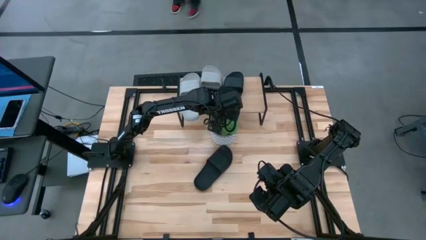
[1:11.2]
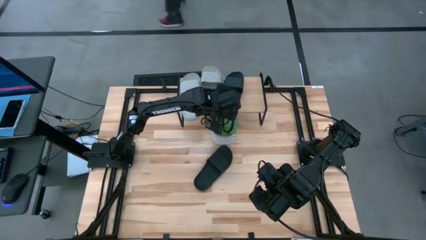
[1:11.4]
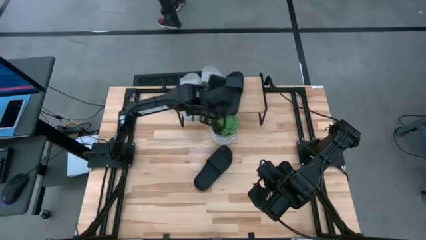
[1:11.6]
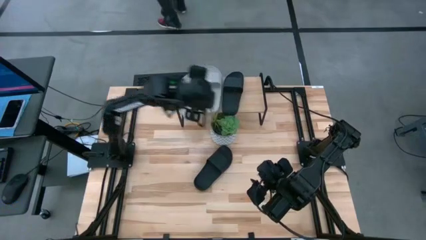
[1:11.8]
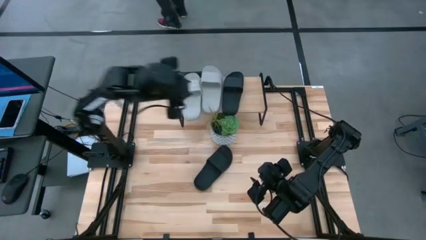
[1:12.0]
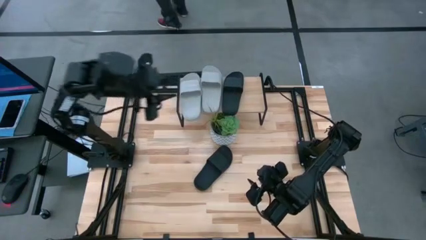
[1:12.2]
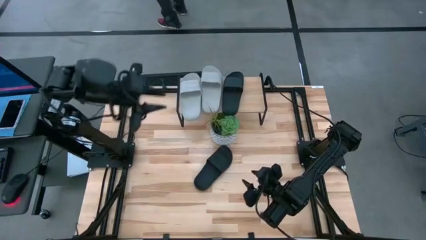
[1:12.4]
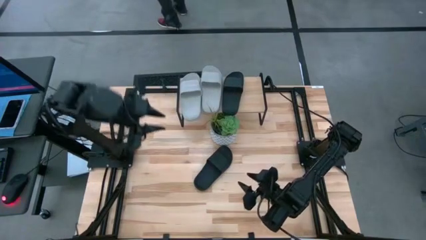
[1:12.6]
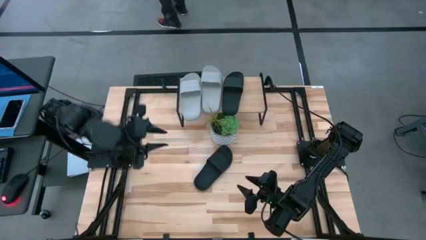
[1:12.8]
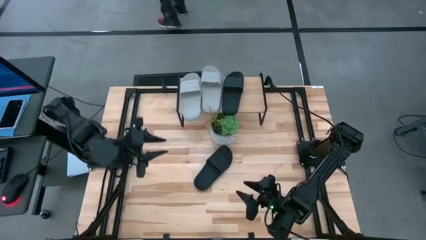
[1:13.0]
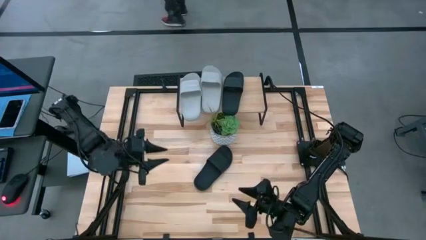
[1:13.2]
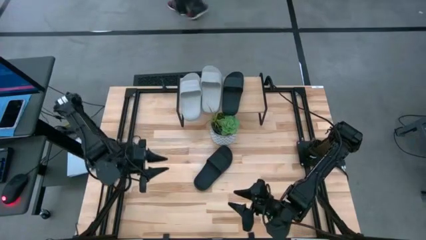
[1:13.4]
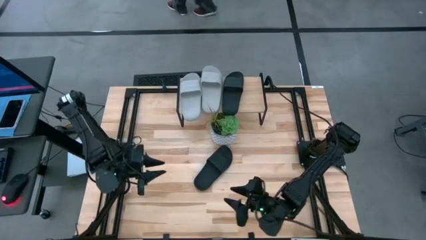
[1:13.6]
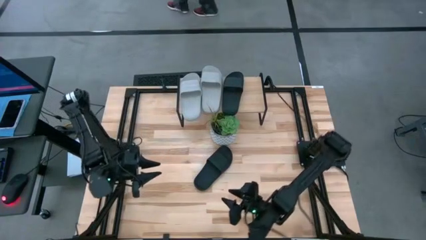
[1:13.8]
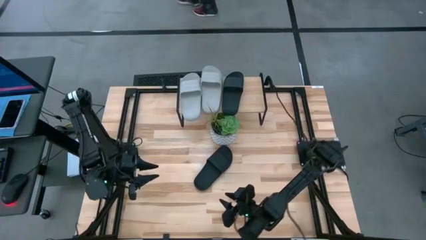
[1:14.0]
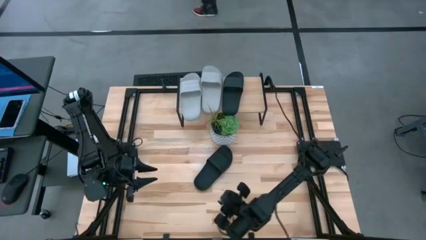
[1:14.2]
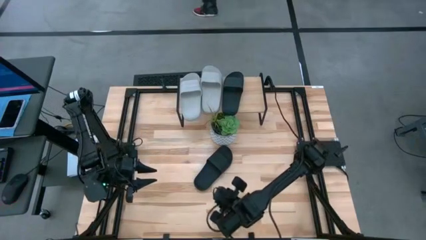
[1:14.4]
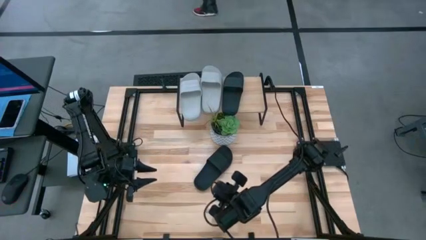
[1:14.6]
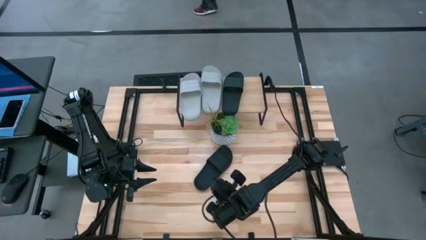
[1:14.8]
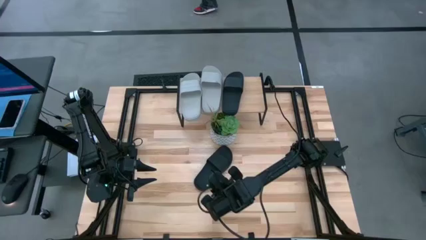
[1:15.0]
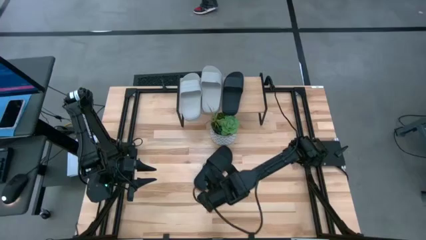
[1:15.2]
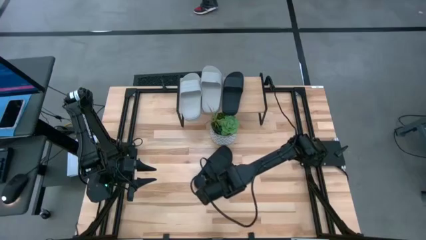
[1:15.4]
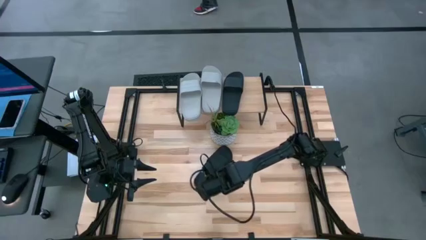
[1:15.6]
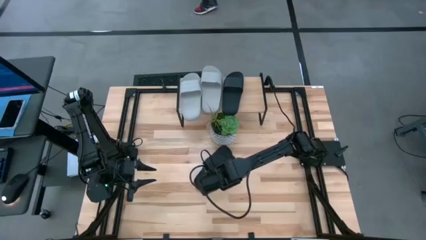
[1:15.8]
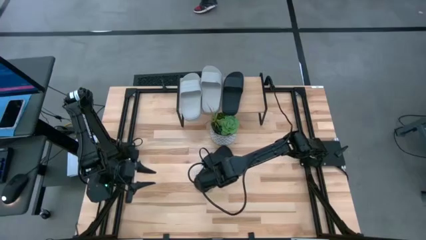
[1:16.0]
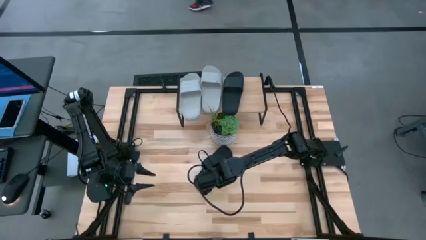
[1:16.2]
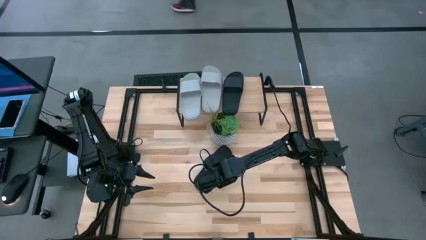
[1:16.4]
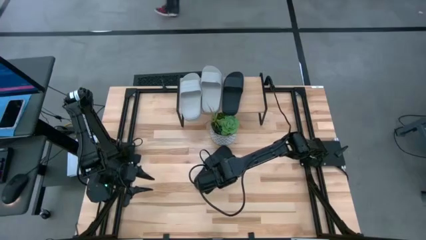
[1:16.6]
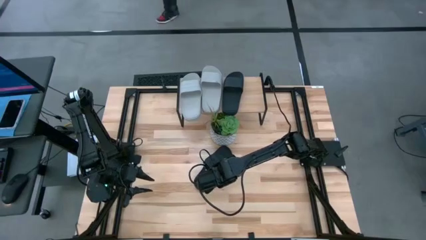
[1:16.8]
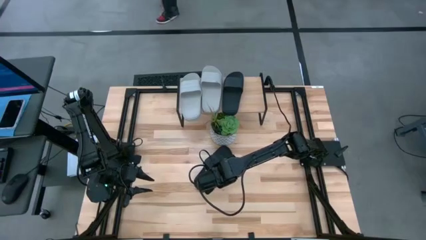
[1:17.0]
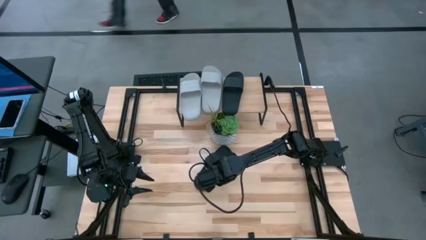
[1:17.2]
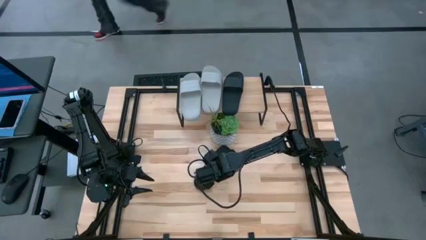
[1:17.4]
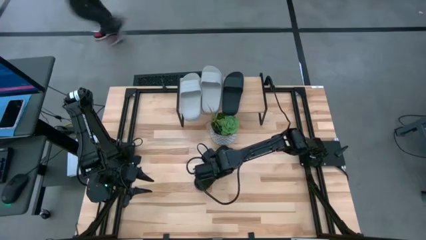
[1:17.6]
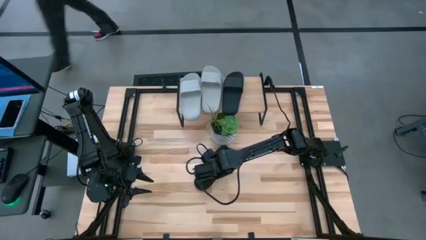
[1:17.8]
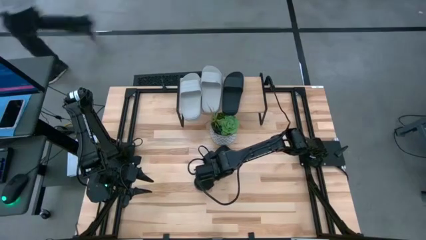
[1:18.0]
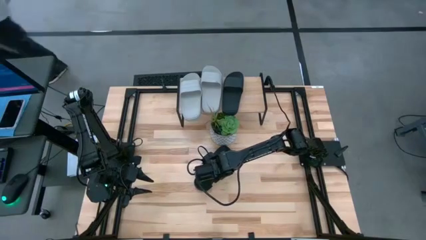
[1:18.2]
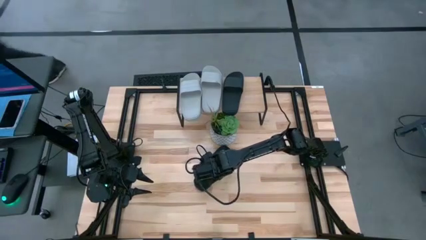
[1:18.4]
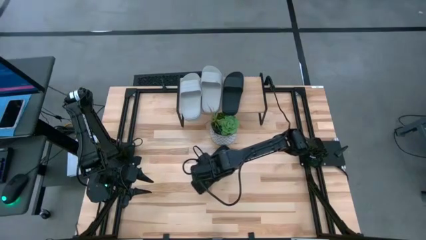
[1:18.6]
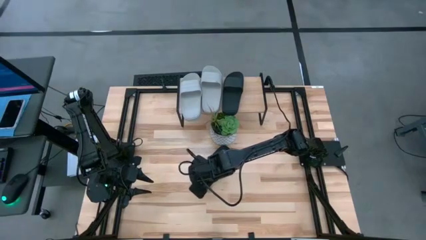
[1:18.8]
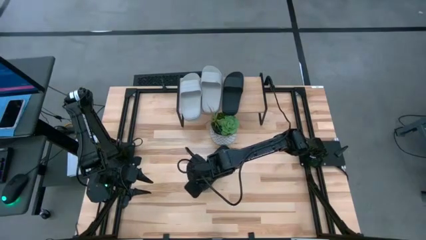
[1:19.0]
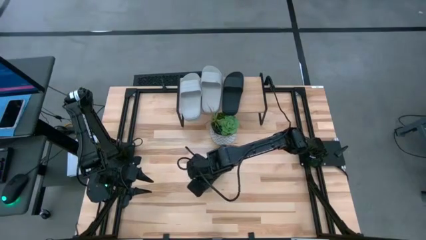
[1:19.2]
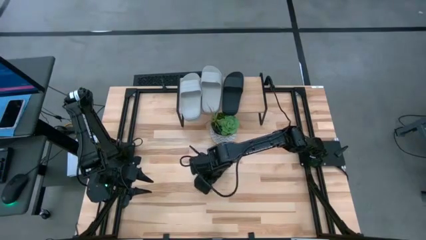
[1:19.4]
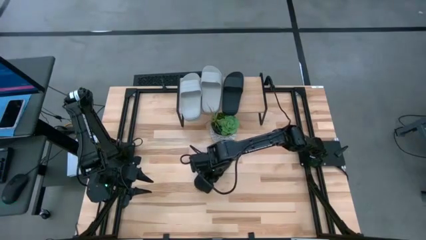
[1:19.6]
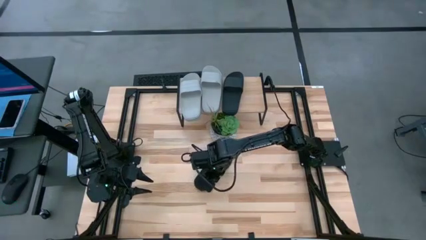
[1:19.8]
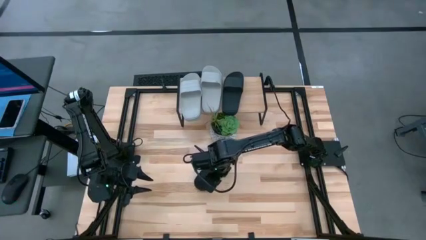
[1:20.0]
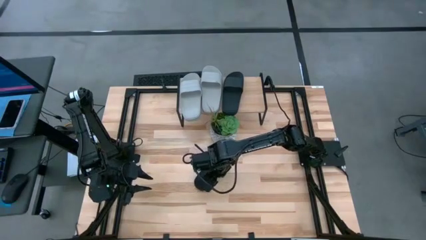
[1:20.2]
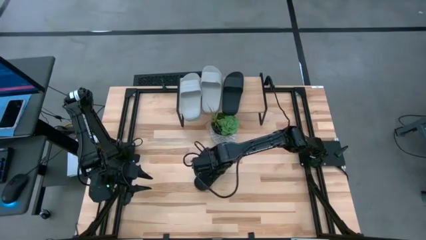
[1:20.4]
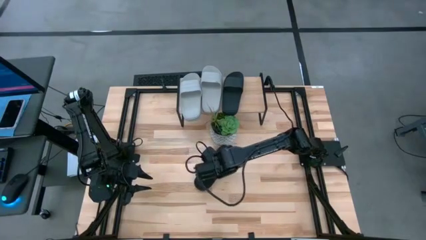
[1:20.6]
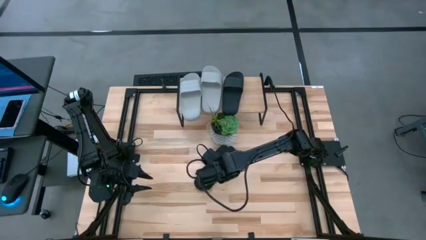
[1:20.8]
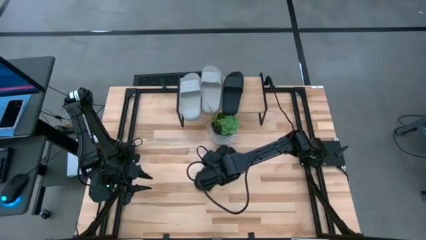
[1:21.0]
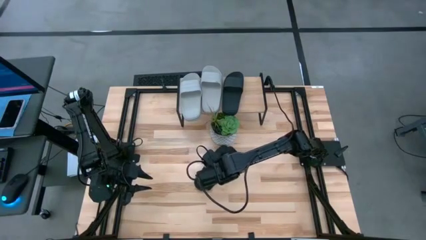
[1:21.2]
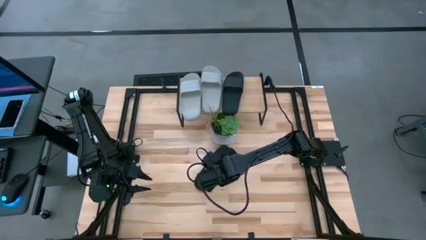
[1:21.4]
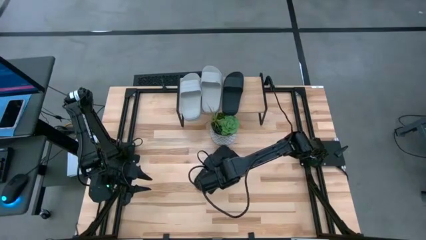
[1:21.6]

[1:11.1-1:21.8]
Task: Pick and place slides into the shelf
Put the black slide on the shelf

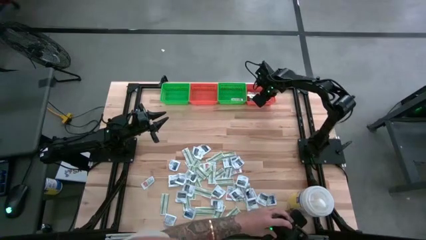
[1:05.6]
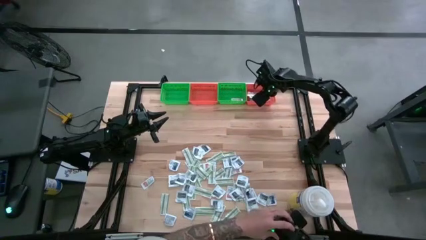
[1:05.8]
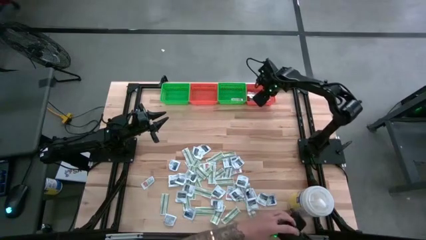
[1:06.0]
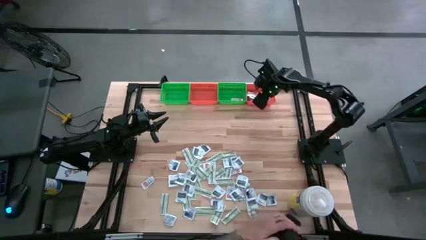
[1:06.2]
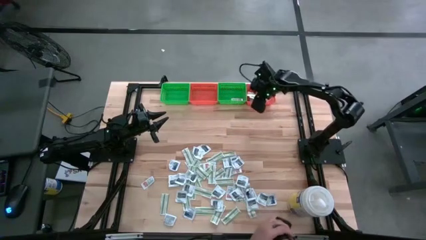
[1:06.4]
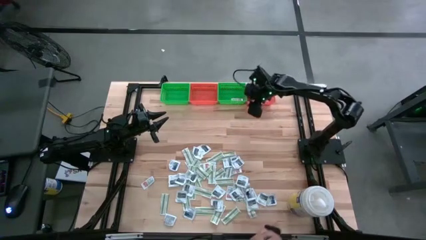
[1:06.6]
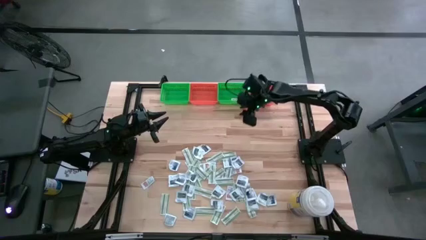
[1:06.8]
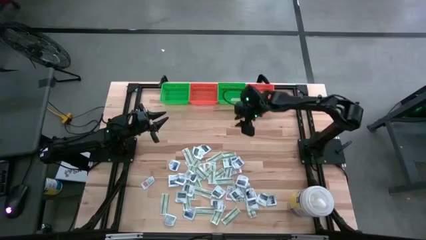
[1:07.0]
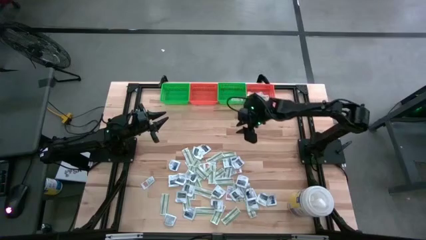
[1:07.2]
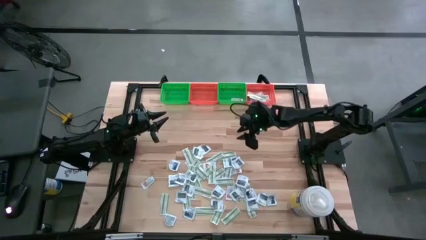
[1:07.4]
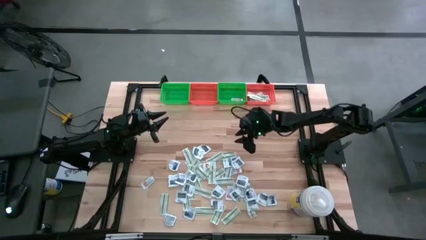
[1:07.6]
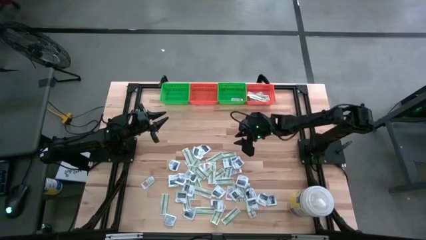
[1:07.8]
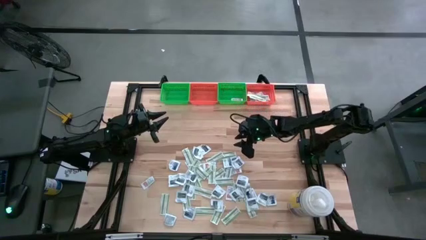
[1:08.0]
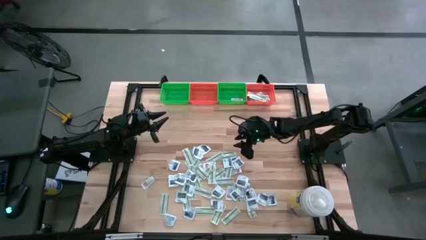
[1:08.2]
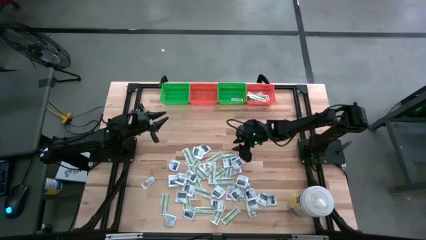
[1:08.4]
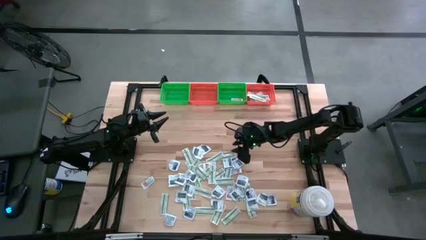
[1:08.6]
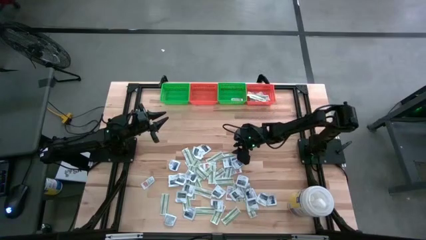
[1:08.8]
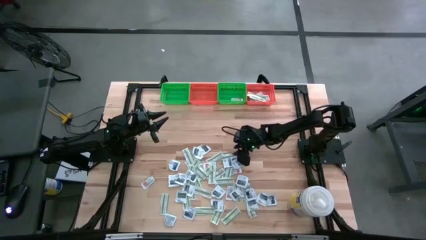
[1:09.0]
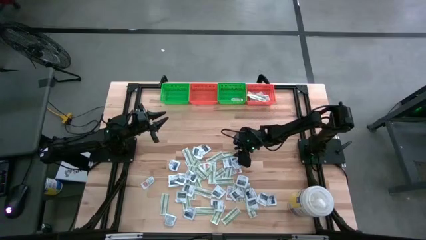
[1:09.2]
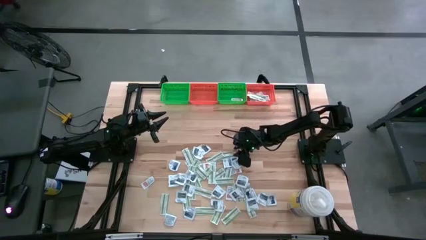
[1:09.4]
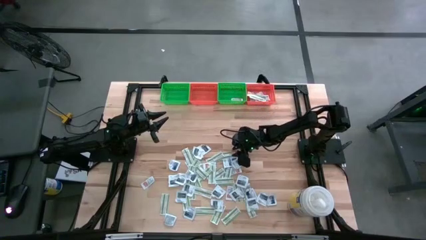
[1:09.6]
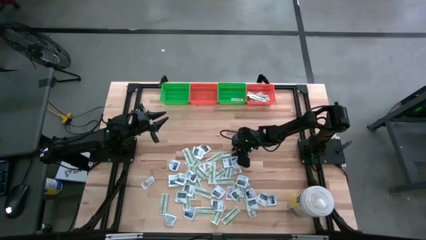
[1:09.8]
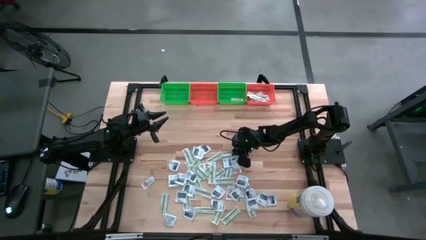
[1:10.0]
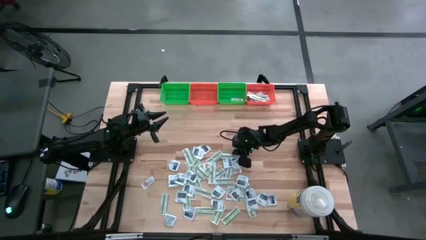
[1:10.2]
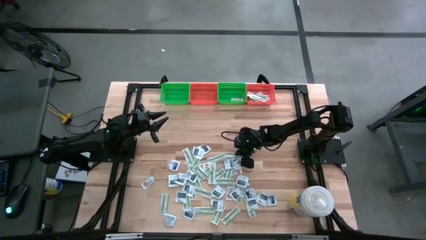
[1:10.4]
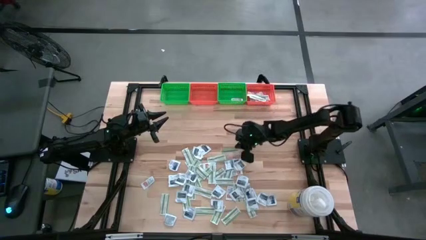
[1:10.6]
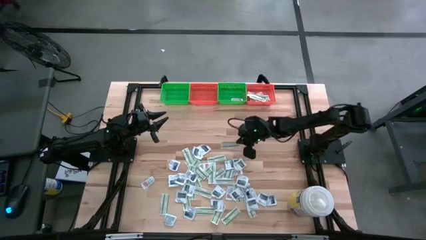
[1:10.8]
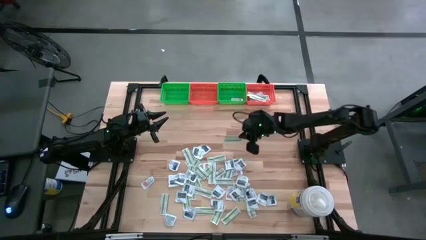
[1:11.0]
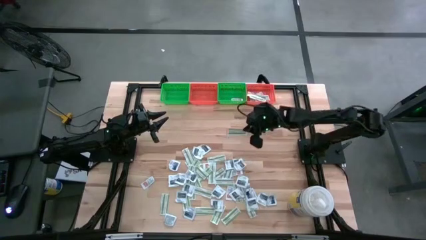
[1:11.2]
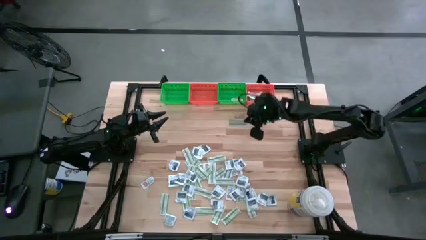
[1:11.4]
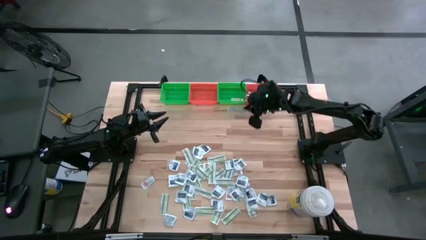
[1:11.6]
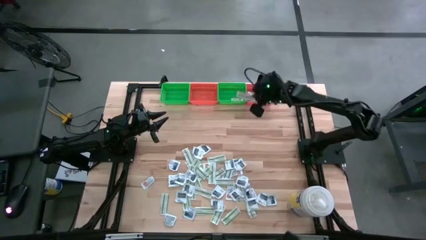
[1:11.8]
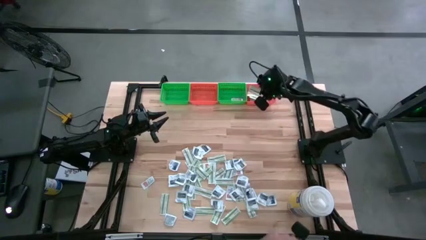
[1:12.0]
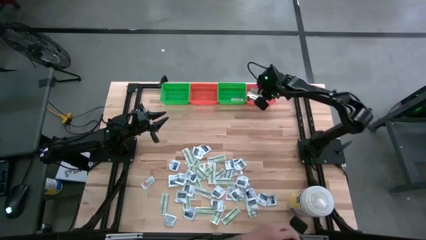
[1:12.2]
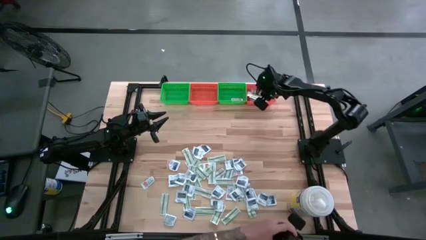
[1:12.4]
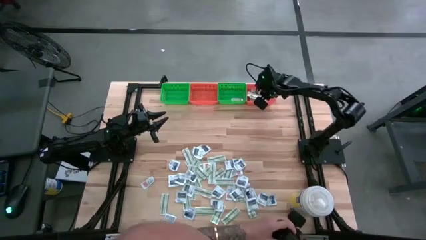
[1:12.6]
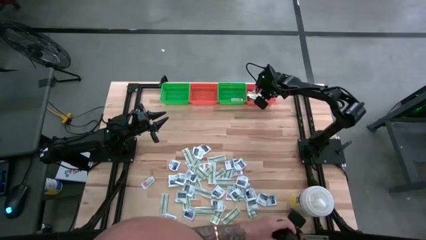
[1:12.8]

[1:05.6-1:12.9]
Task: Pick & Place First Aid Supplies
Put the green bandage pack in the right orange bin
